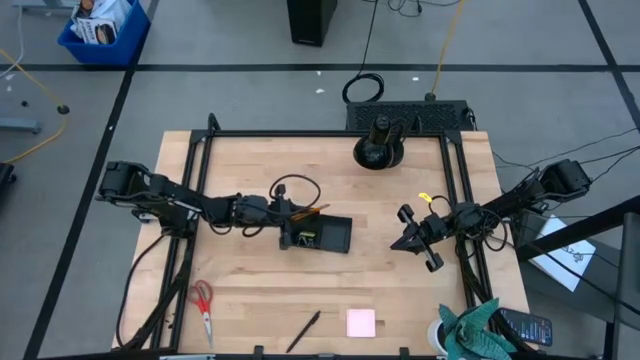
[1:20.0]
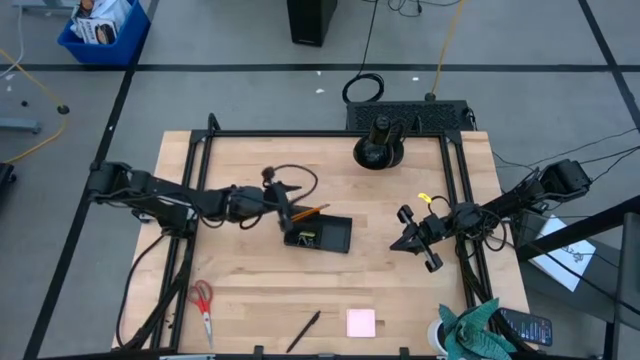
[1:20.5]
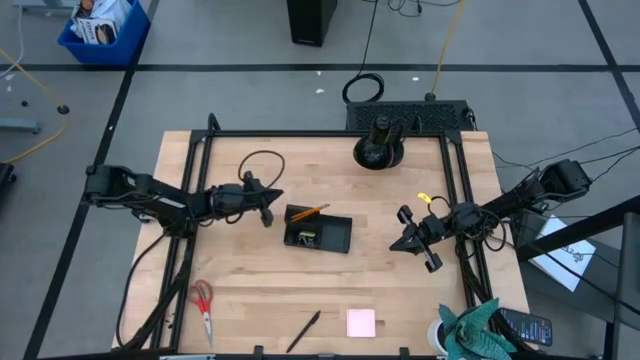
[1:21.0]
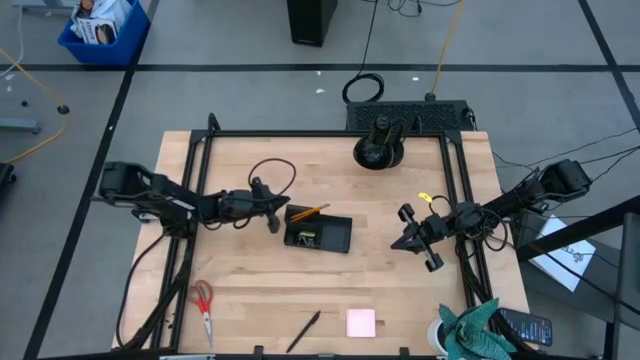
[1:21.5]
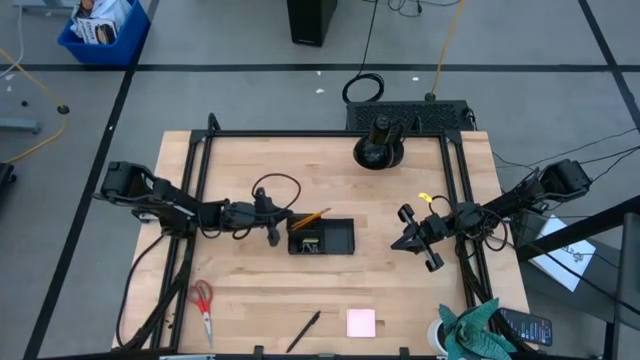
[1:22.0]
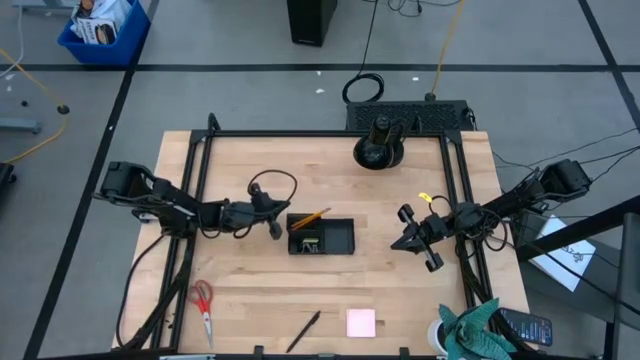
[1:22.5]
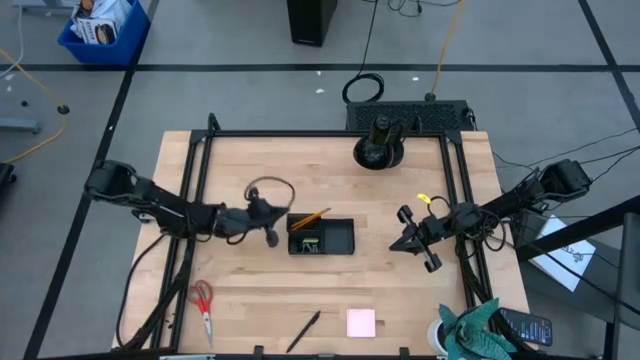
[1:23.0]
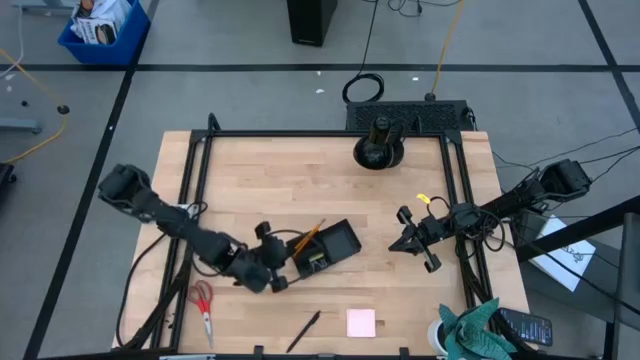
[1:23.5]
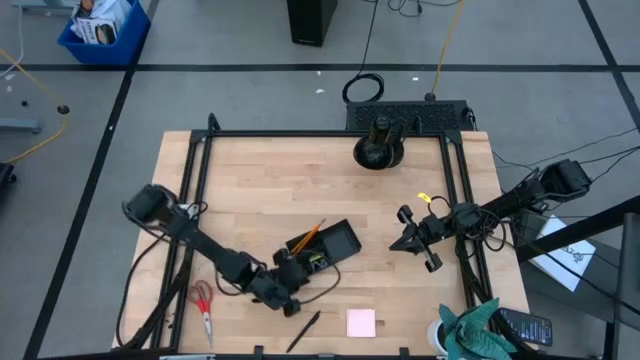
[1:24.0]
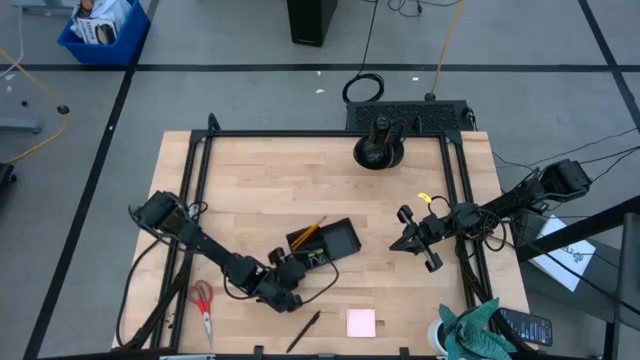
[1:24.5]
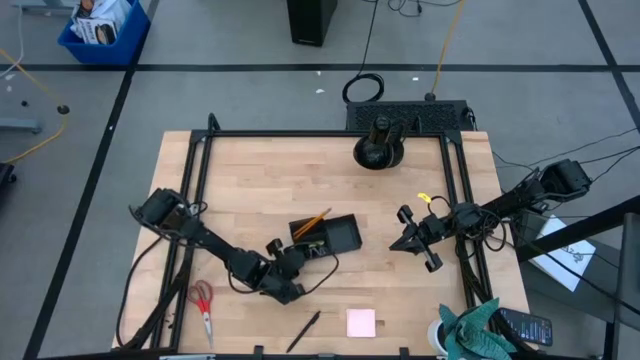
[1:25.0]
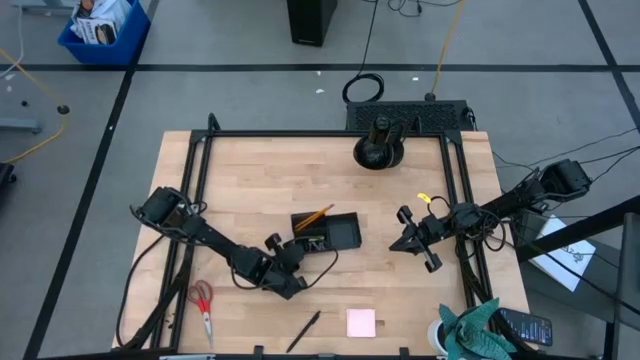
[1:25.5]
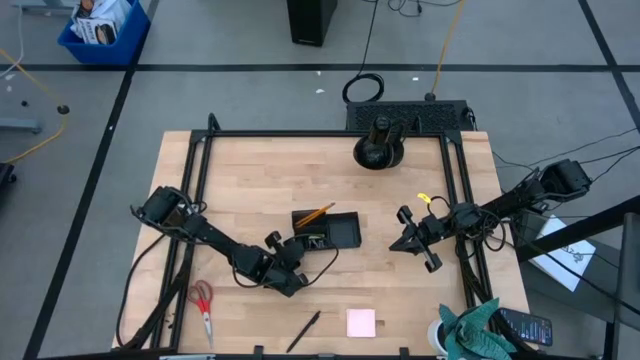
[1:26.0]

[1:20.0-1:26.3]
Task: Pick and place office supplies into organizer
Adjust the black desk organizer

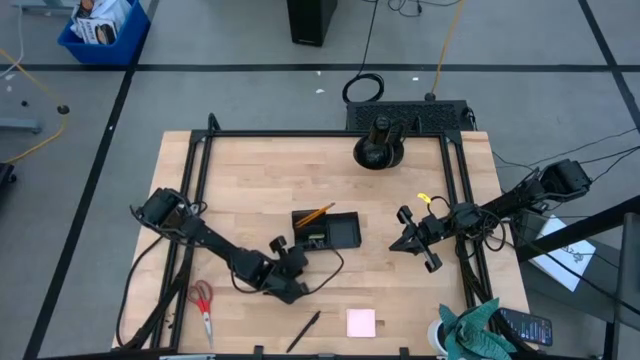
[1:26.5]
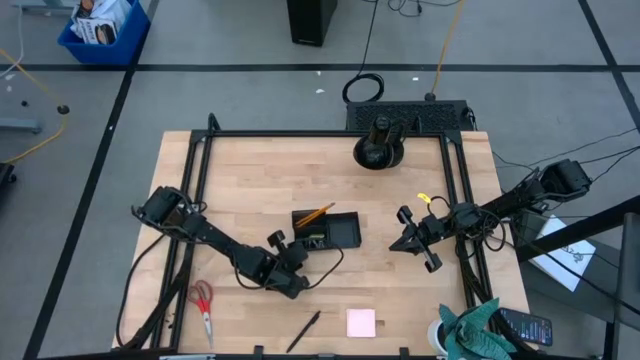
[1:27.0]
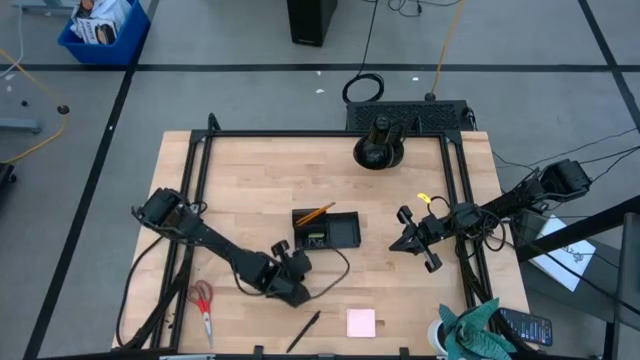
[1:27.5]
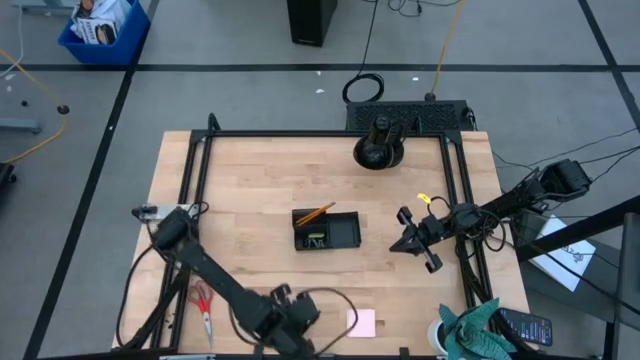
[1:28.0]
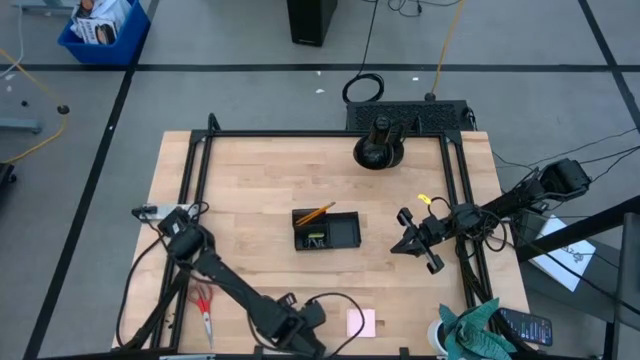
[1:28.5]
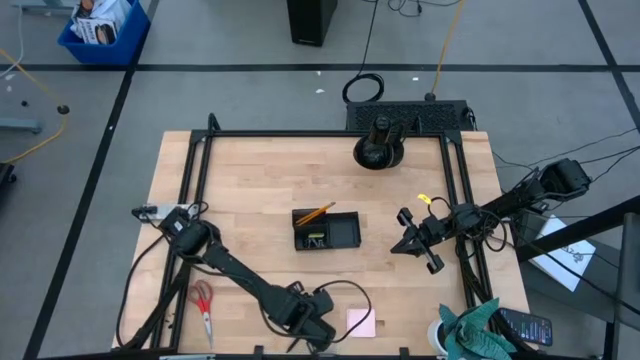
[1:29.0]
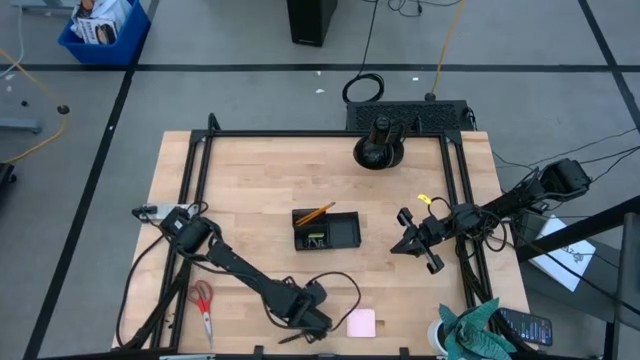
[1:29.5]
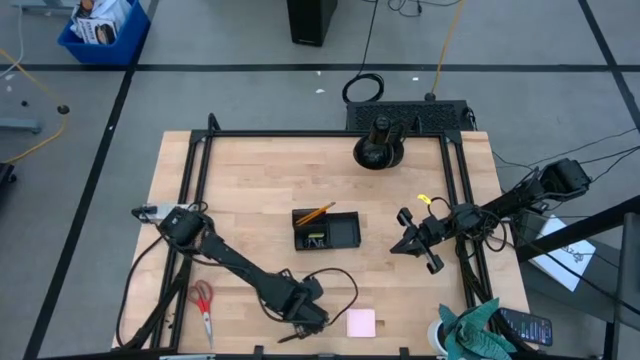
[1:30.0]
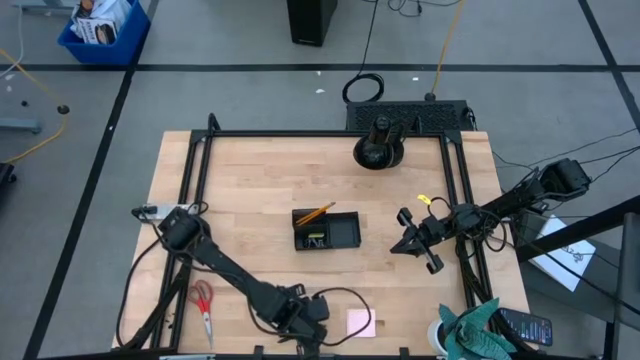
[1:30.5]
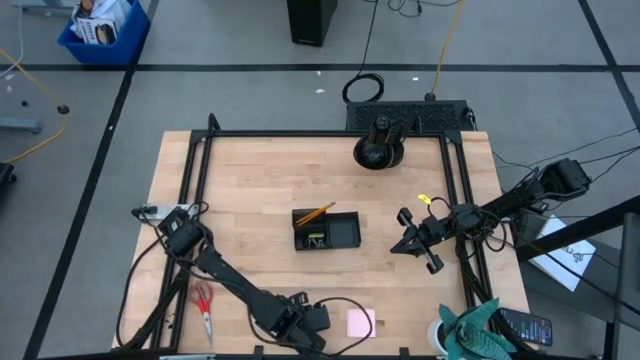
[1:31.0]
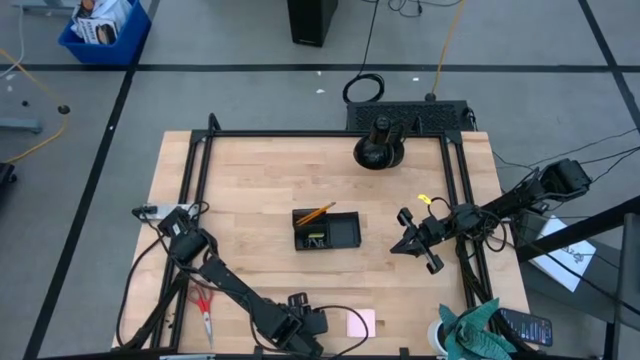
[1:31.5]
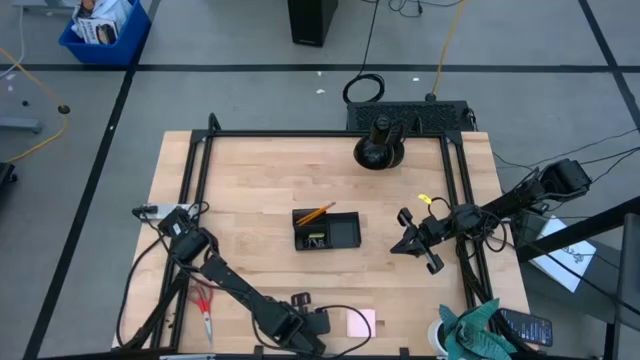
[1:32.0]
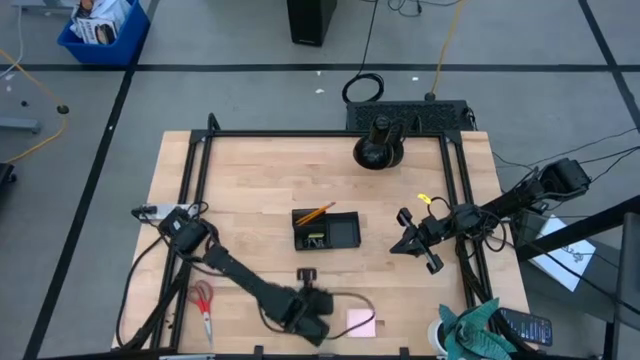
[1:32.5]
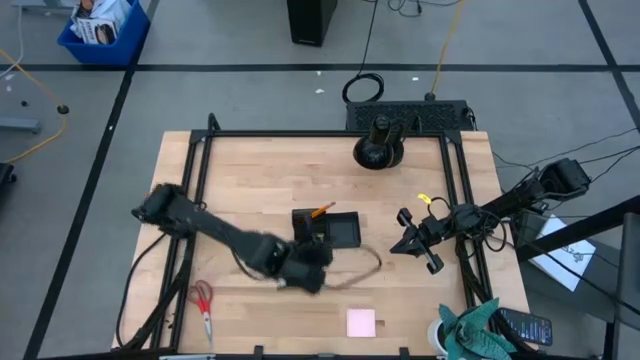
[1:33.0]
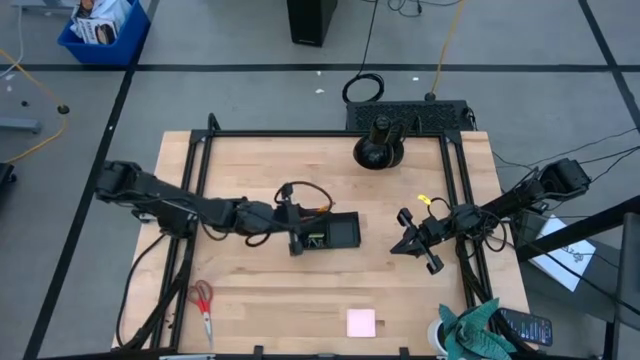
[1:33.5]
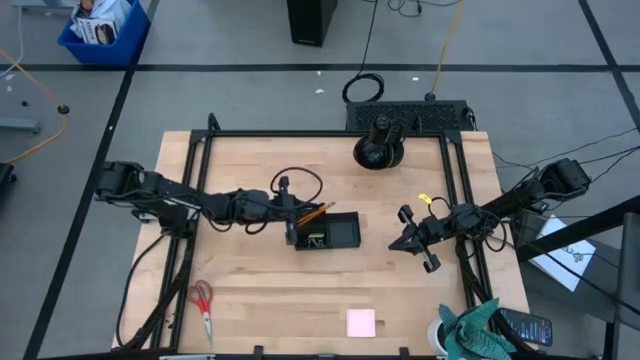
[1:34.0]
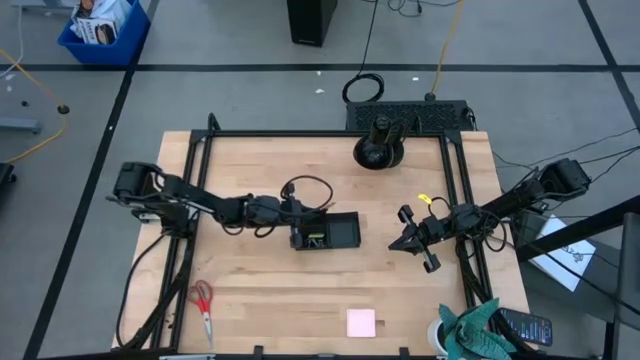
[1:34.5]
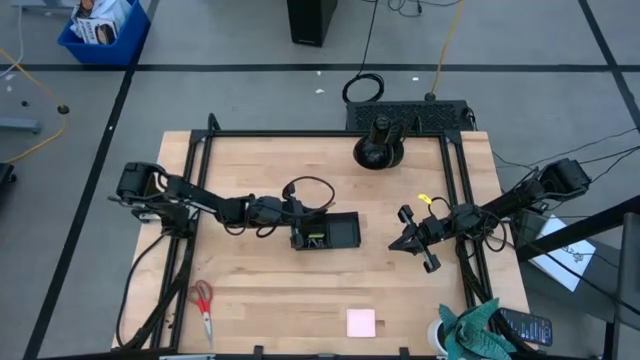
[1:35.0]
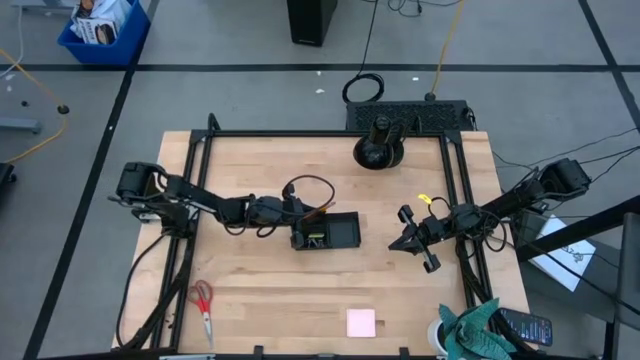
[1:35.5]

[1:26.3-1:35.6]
Put the black pen into the black desk organizer

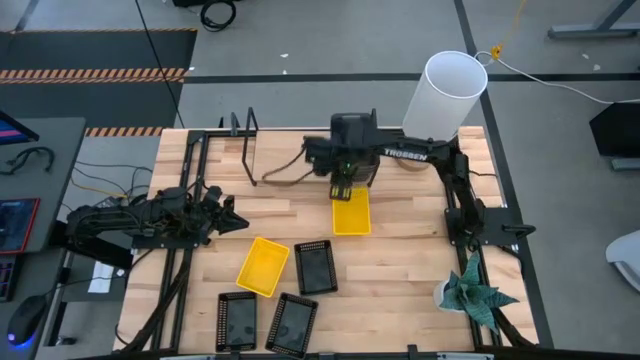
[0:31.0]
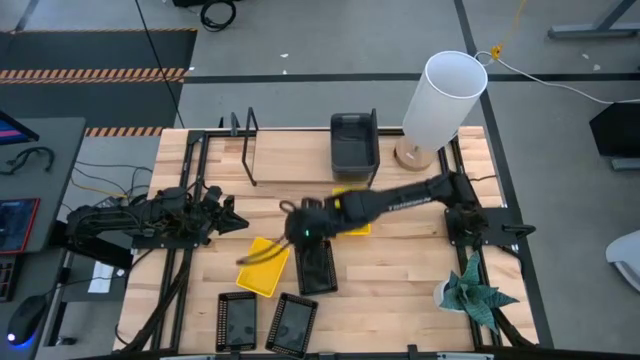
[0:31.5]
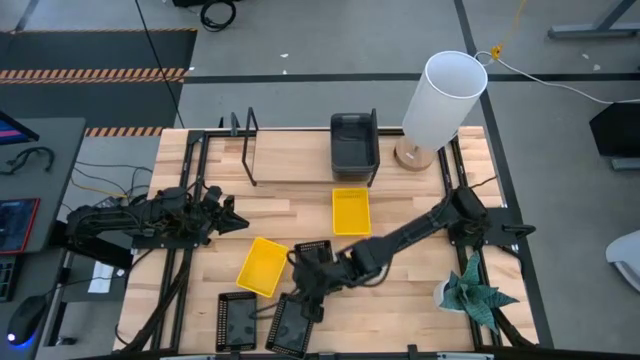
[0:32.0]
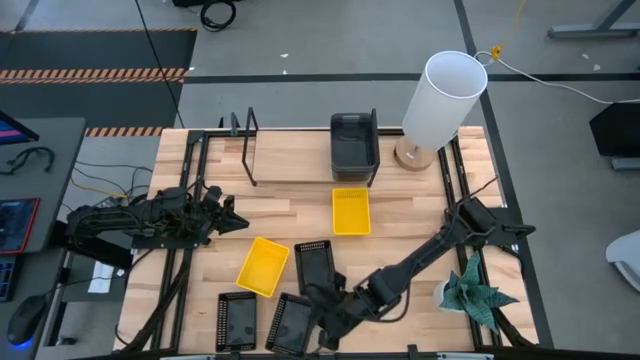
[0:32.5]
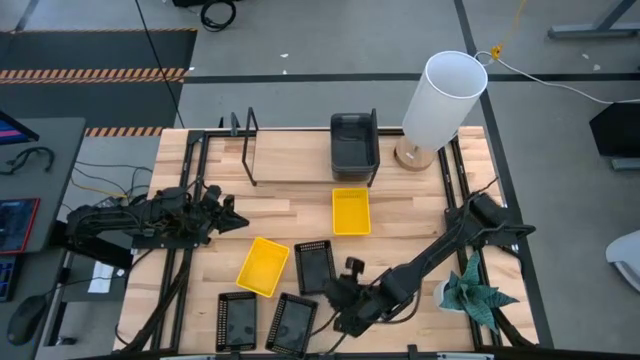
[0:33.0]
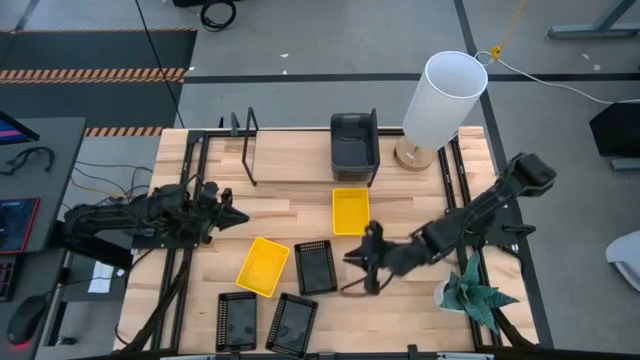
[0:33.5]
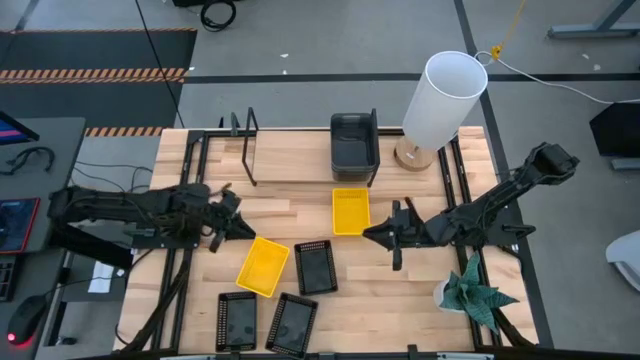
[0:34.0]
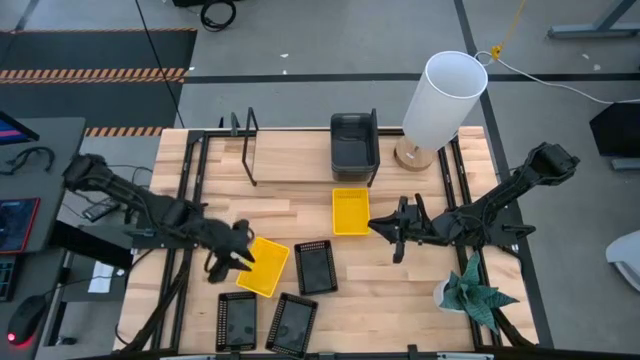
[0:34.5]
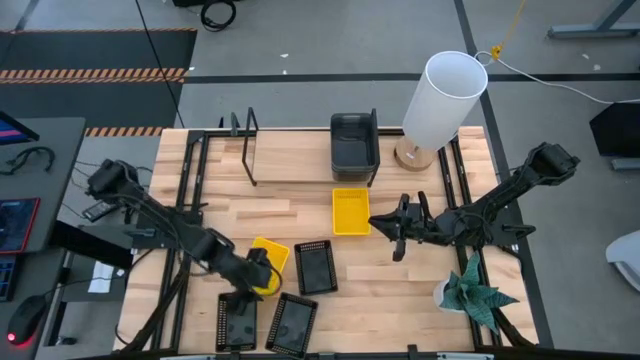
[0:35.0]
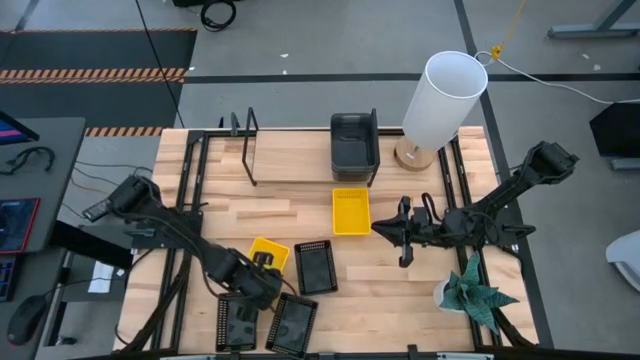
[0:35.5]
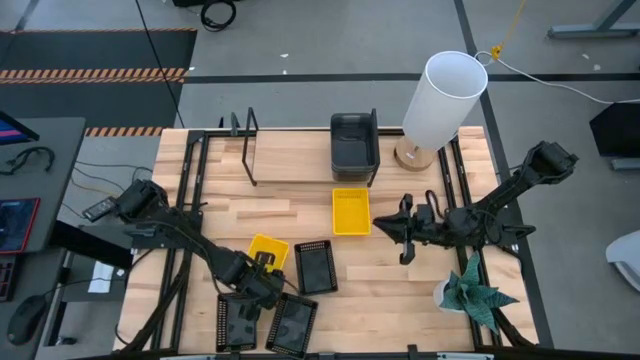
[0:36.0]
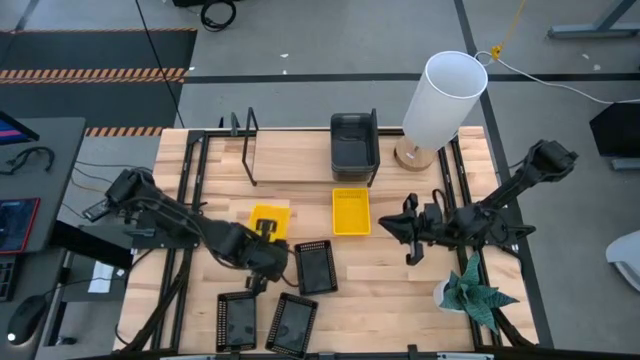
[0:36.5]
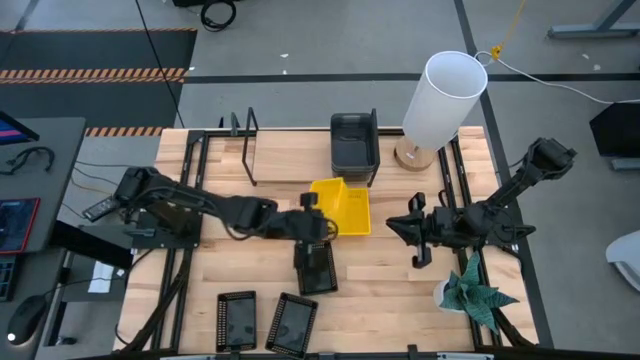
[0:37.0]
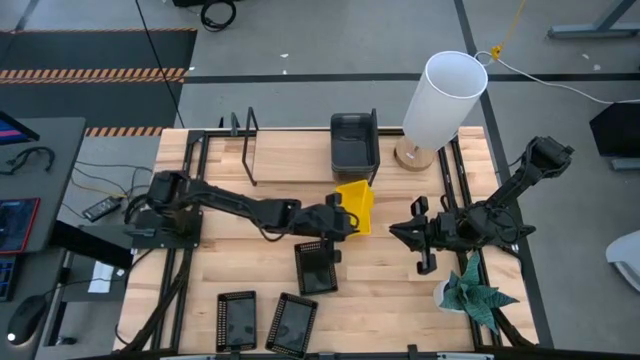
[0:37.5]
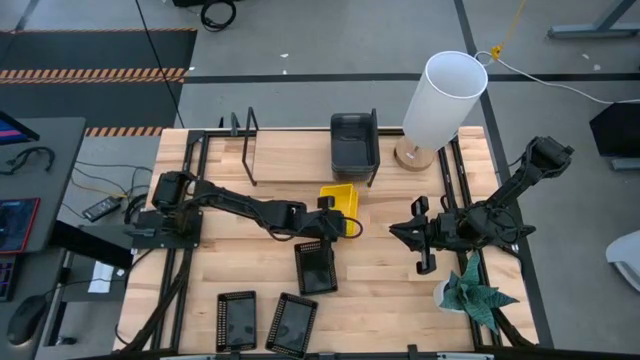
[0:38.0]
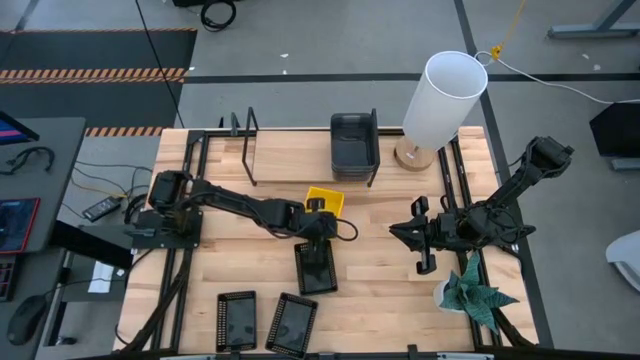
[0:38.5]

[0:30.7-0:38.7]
Task: Stack baskets on shelf by color
Stack the right yellow bin into the right yellow bin
